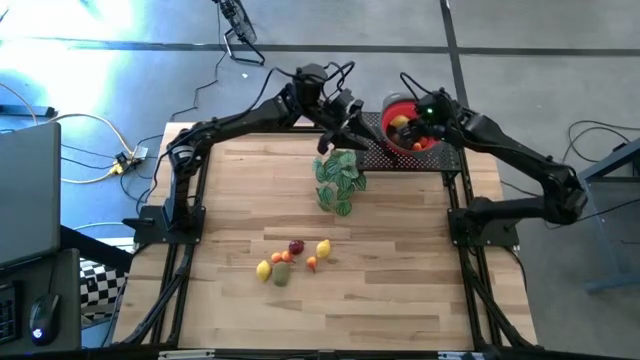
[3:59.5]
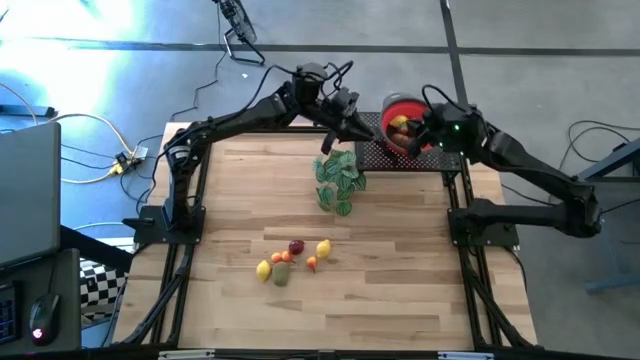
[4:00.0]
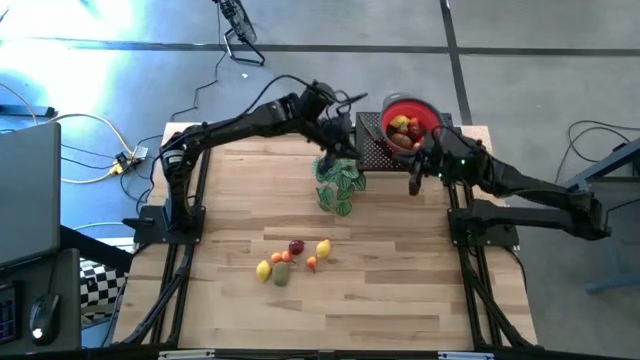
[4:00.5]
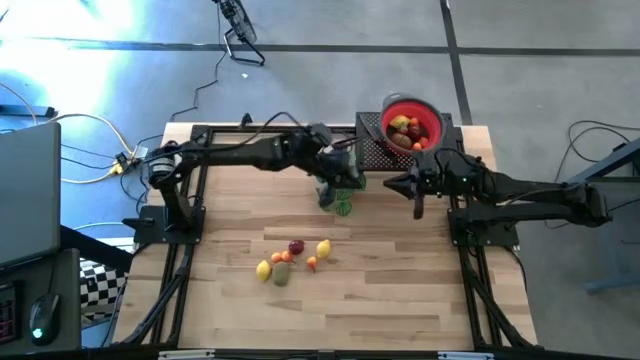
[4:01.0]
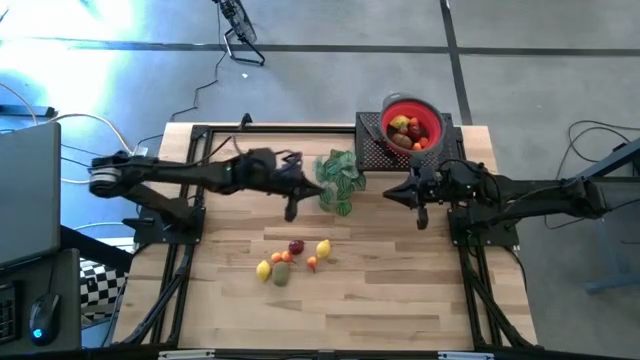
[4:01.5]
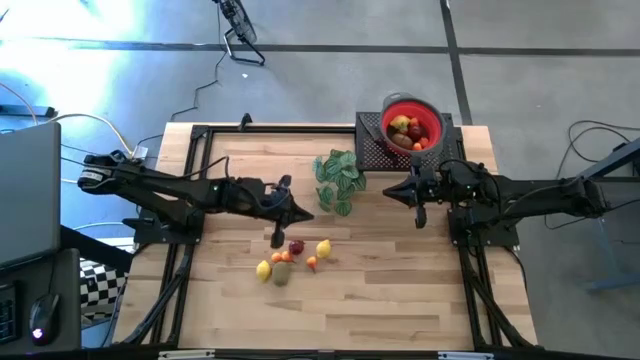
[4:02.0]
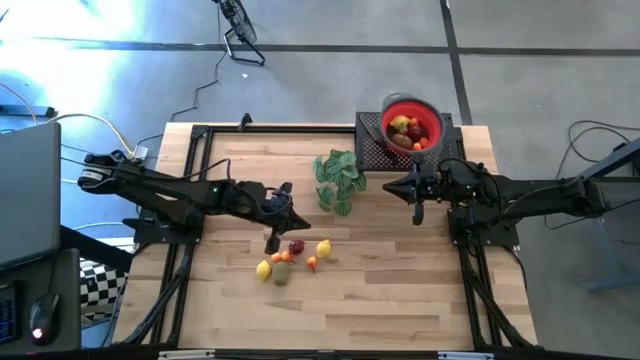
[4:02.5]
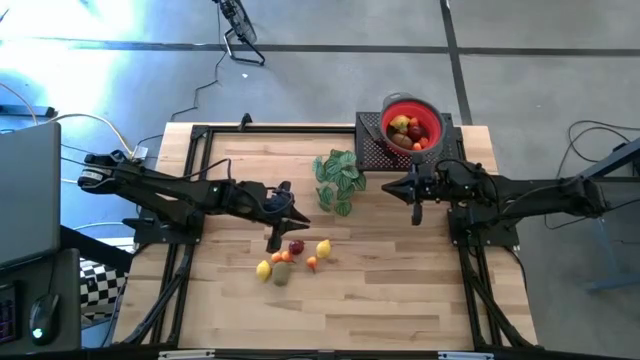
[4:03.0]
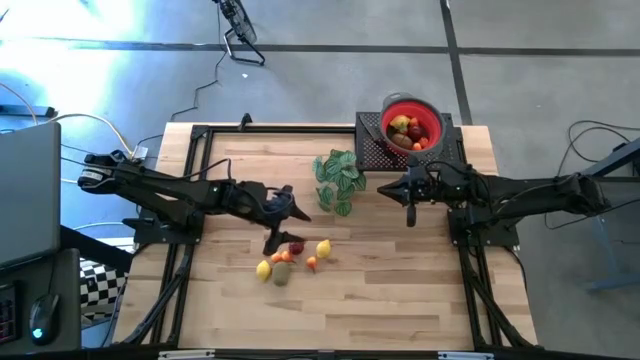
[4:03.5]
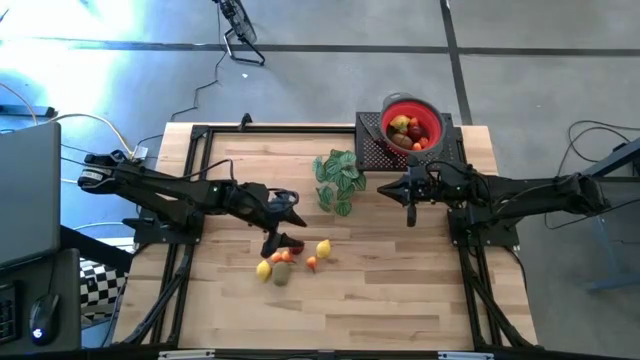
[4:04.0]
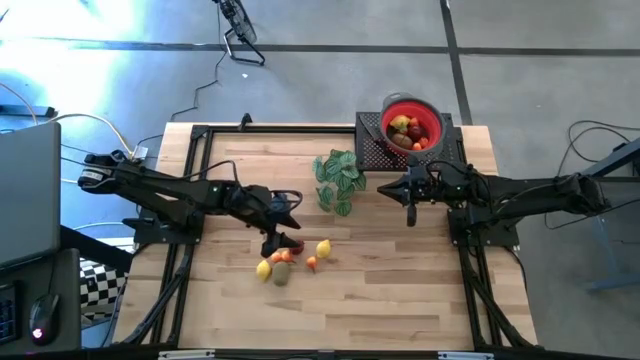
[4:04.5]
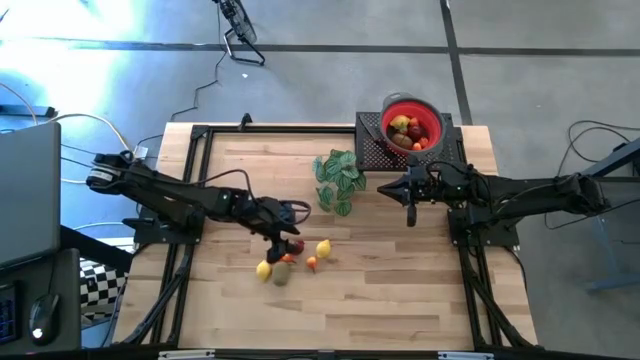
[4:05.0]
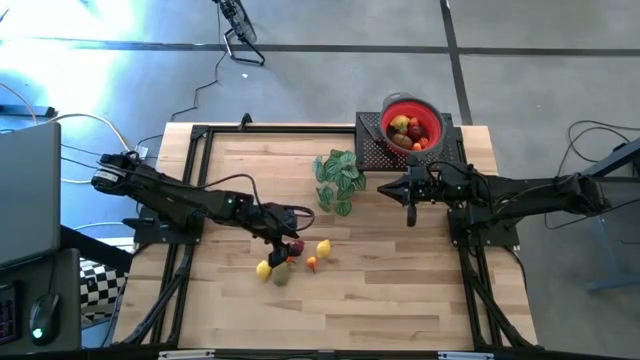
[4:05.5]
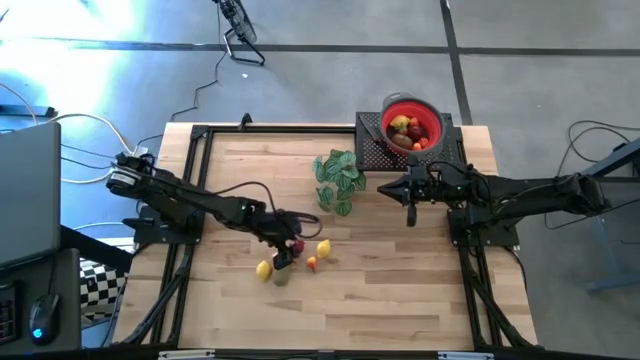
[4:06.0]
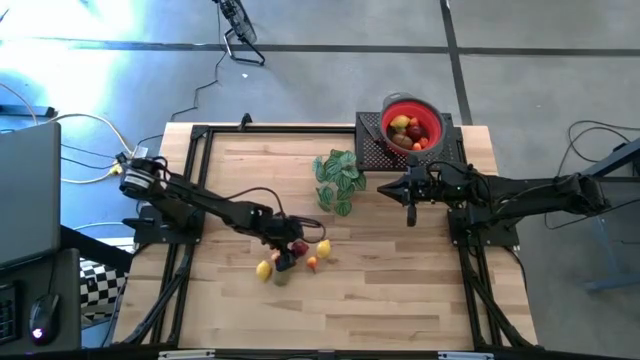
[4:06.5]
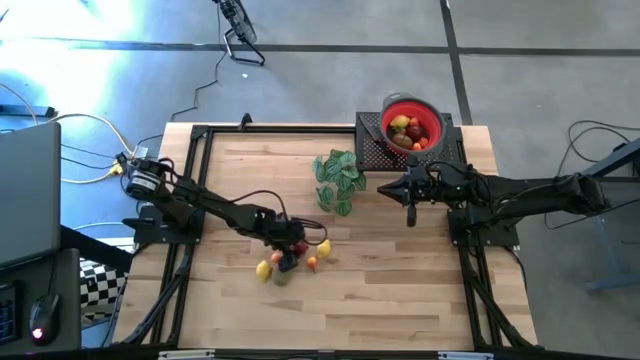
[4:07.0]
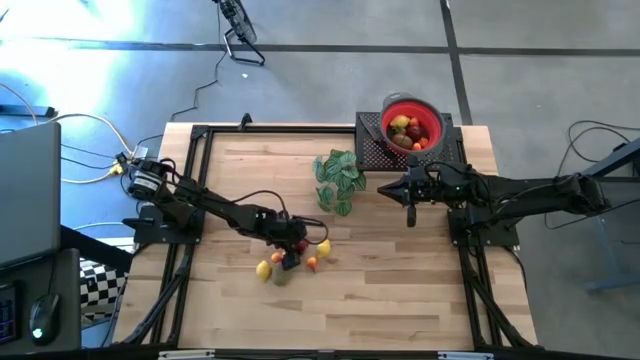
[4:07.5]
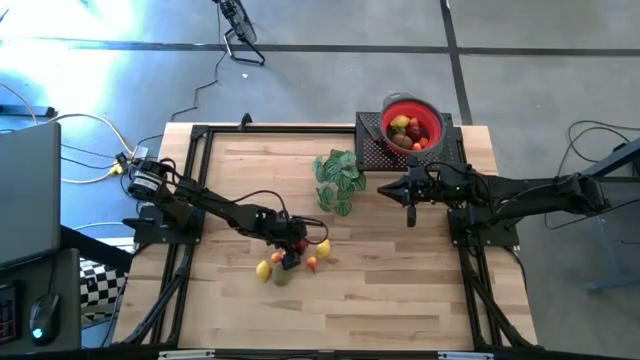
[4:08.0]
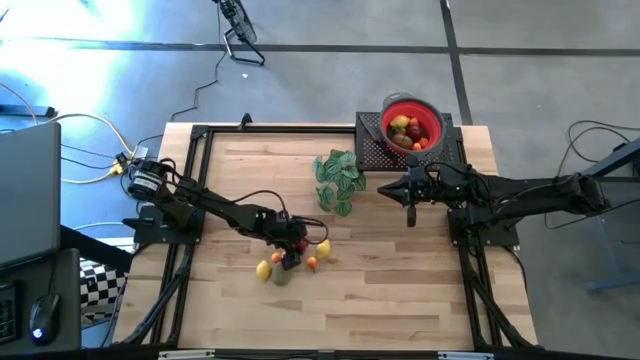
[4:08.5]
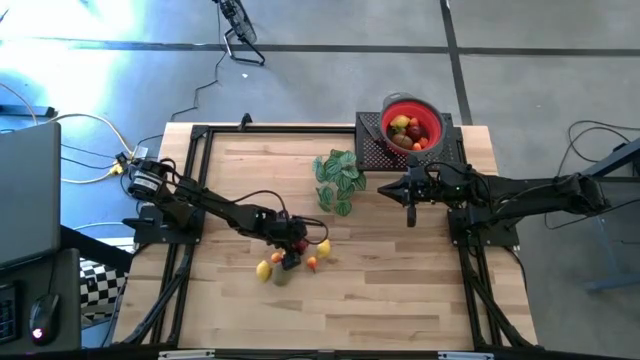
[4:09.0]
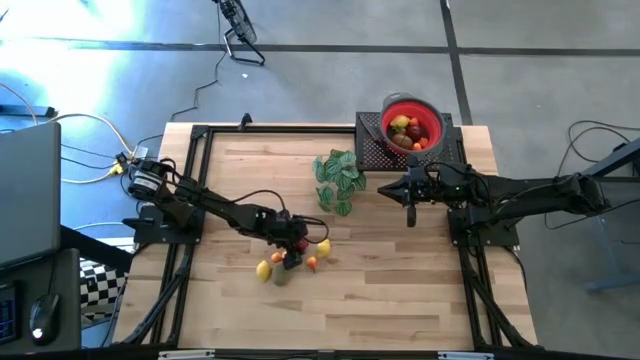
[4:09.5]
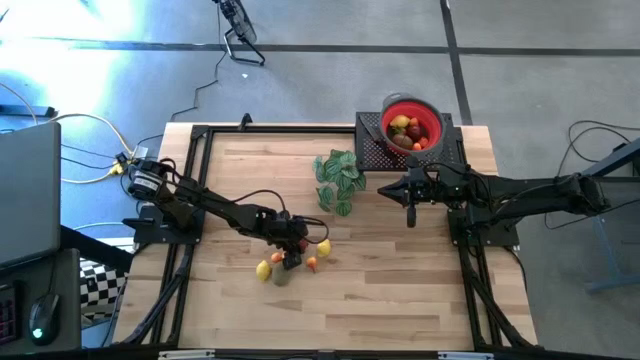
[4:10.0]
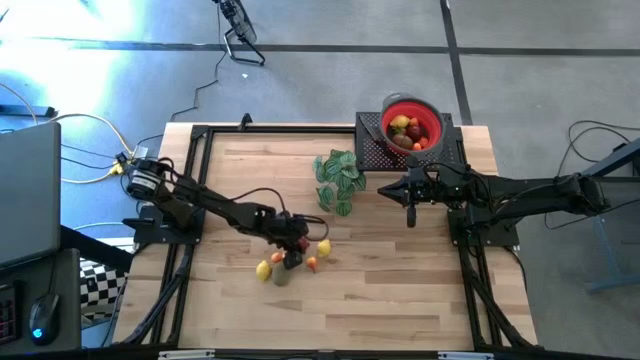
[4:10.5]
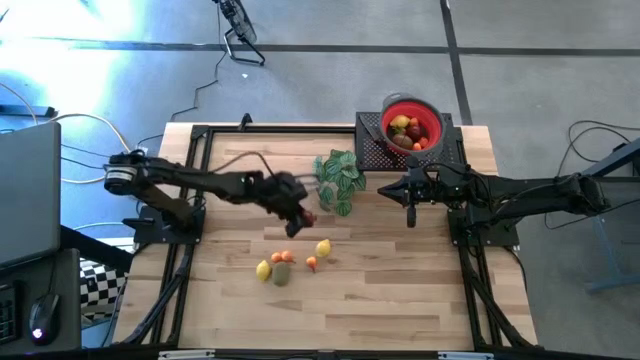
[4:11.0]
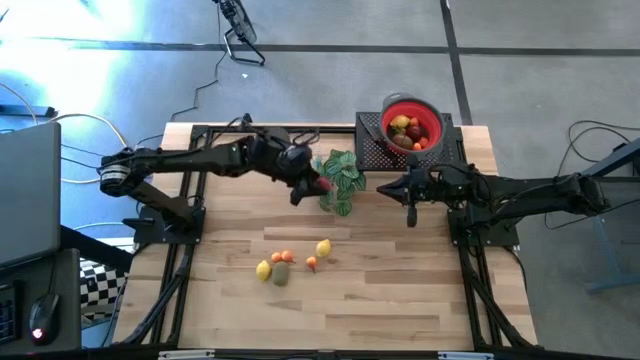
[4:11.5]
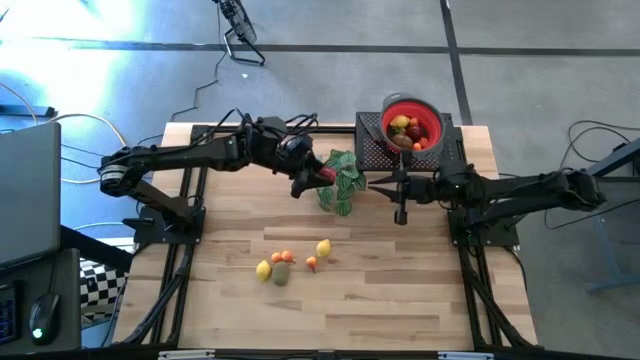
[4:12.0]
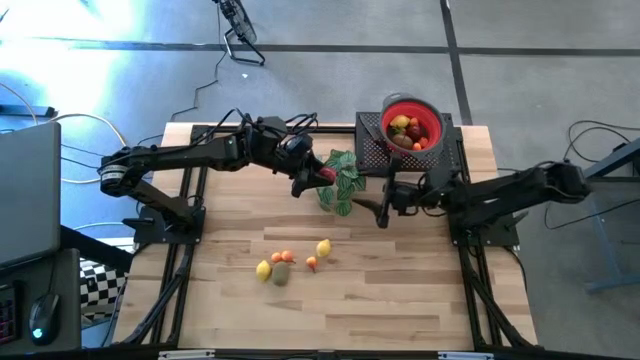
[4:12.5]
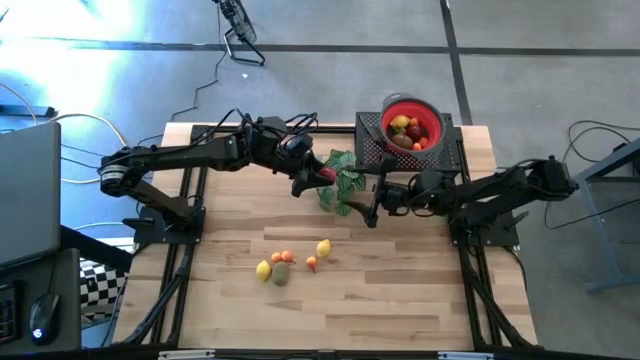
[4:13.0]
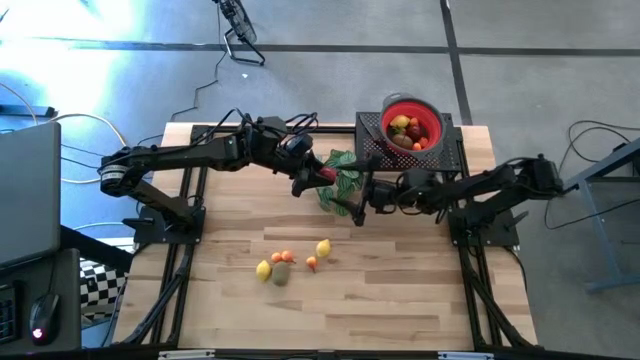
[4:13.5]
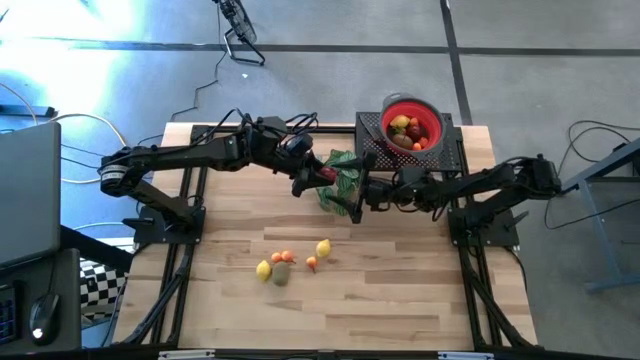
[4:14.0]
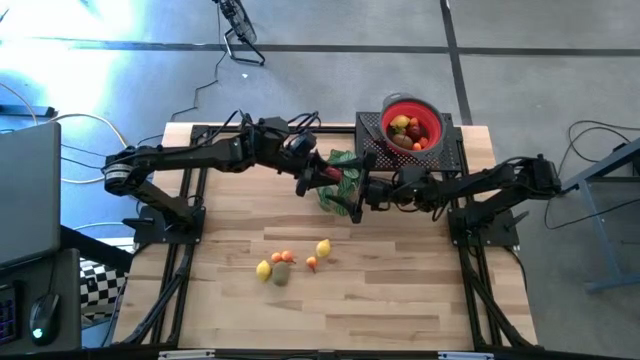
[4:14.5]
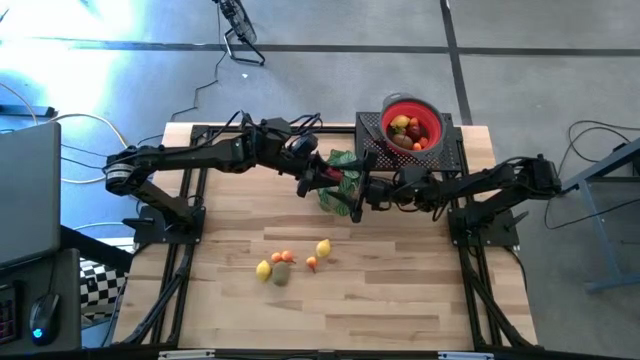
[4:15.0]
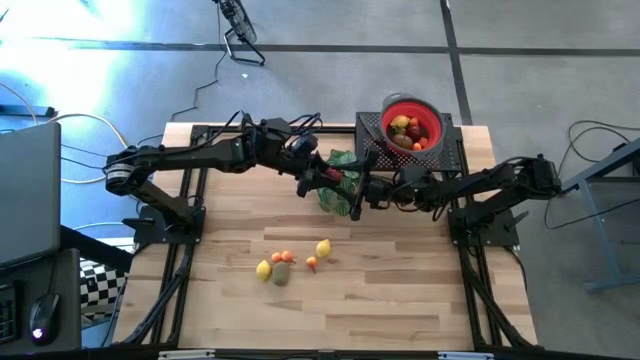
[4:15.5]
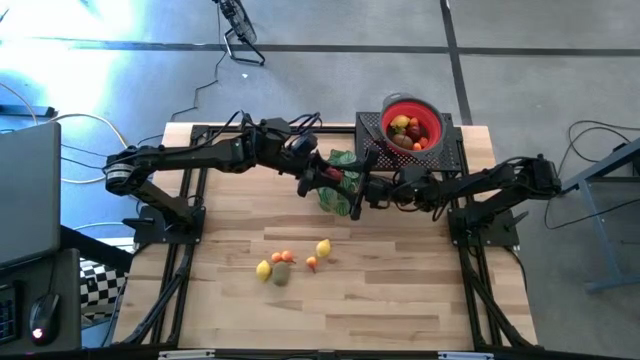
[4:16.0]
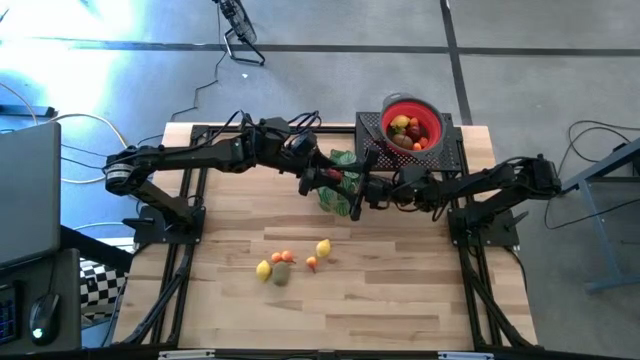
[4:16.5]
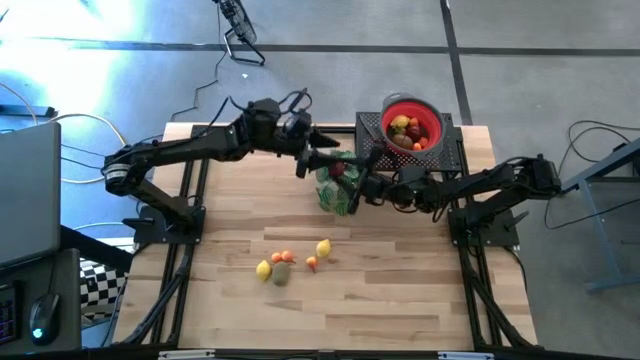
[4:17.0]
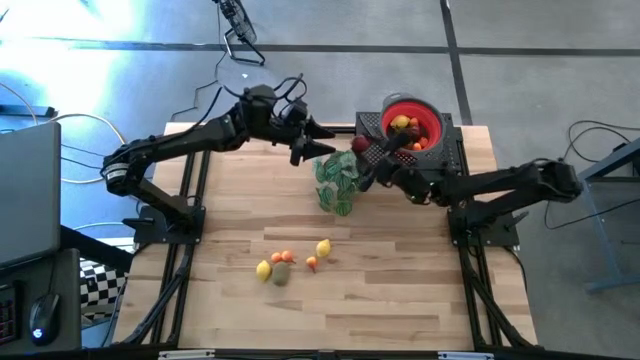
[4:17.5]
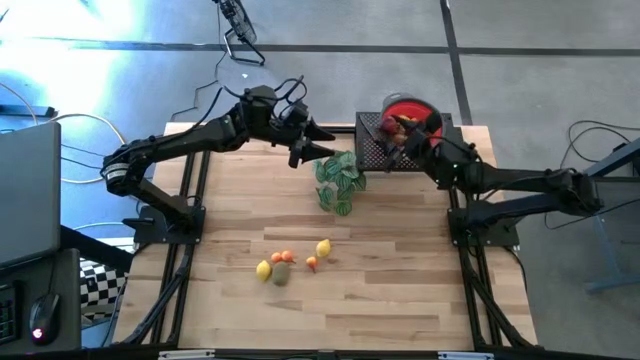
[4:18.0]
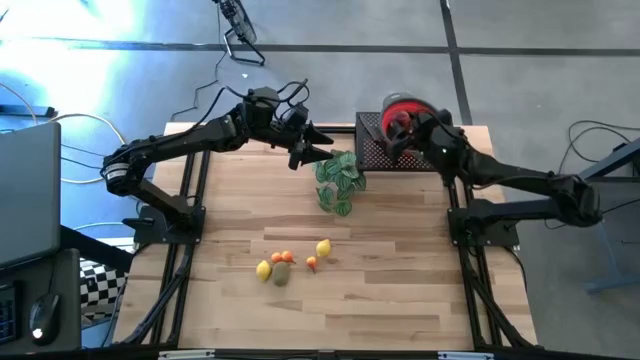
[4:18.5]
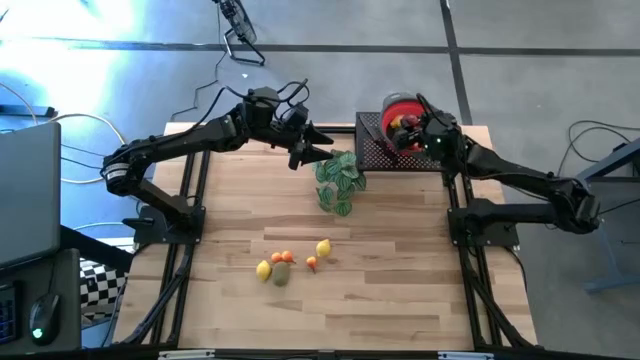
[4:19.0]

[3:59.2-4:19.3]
Task: Pick & Place Fruit
Put the pomegranate into the red colander

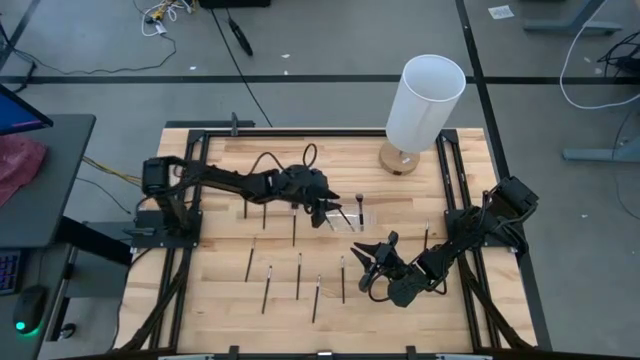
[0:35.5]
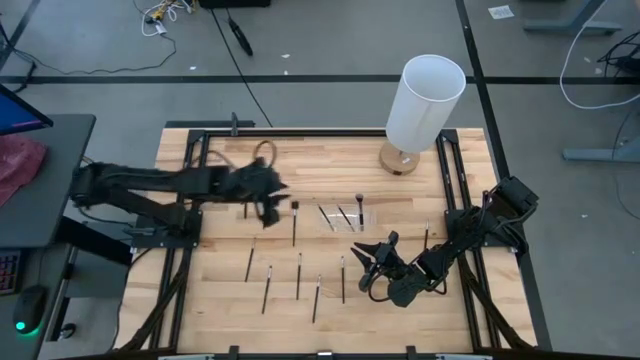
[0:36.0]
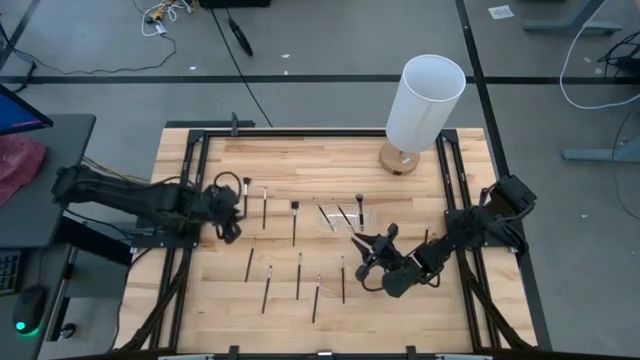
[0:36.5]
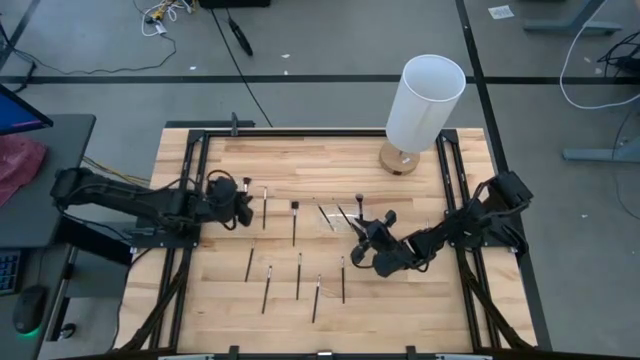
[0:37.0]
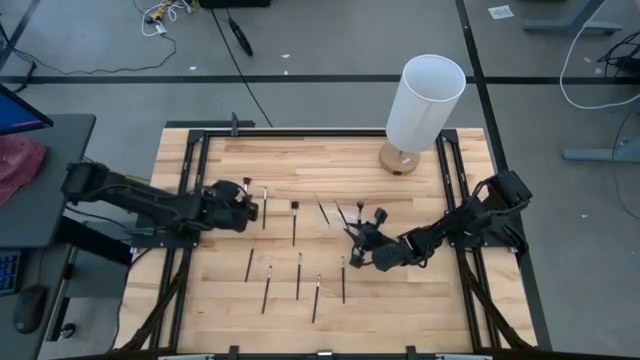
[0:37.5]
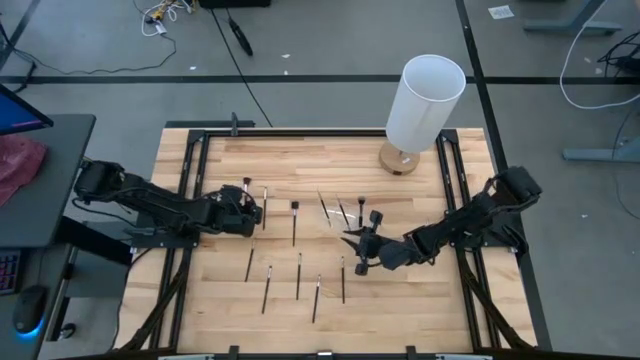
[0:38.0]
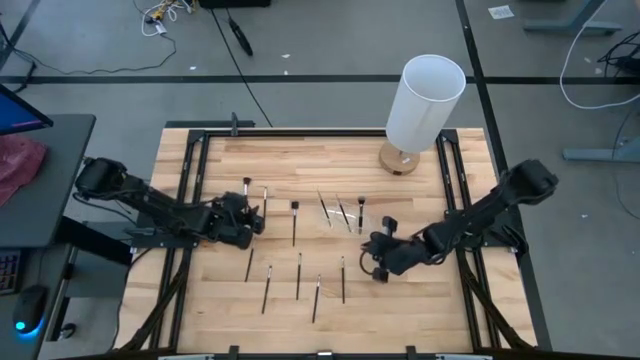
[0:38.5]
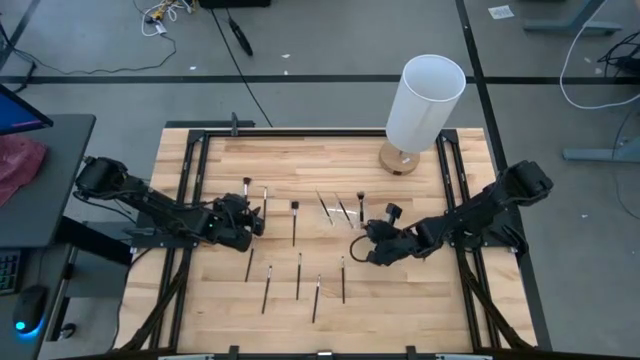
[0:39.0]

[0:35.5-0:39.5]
Task: Pick & Place Makeup Supplies
Adjust the transparent organizer
